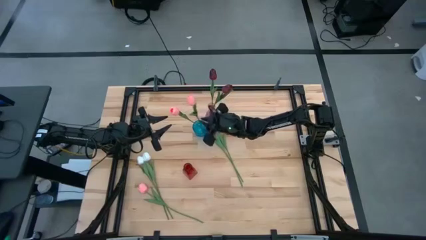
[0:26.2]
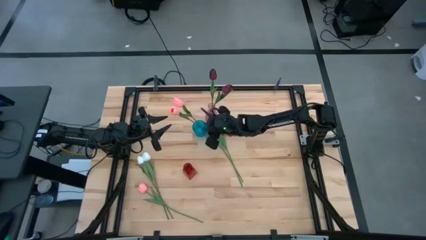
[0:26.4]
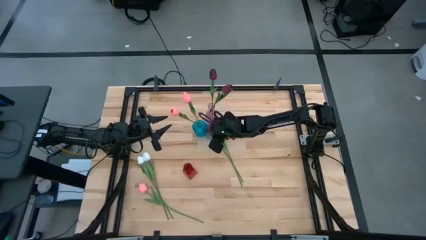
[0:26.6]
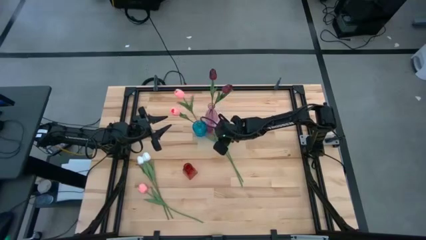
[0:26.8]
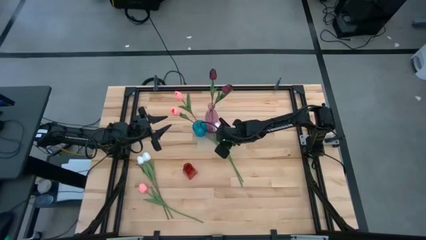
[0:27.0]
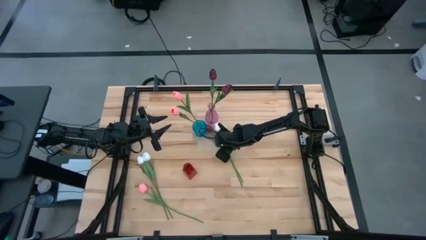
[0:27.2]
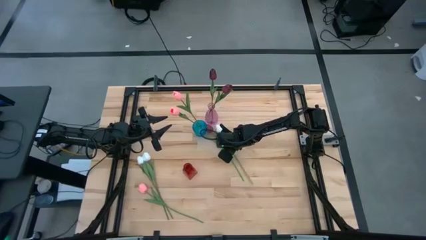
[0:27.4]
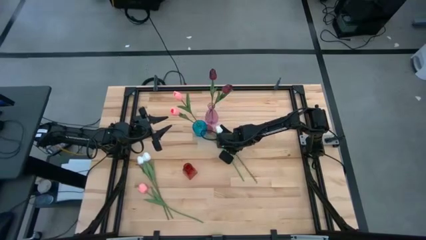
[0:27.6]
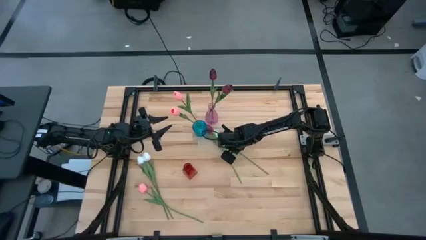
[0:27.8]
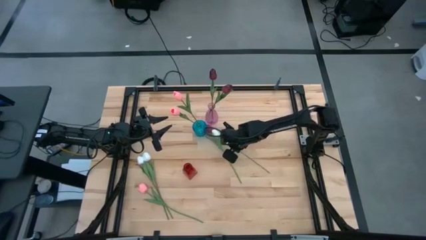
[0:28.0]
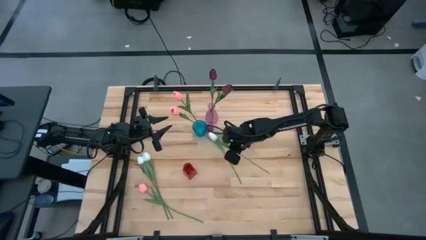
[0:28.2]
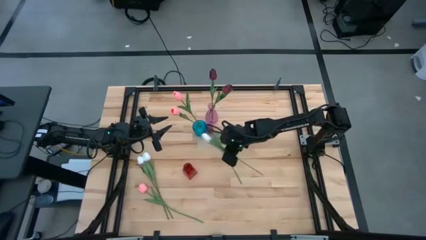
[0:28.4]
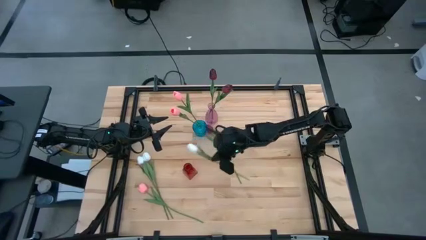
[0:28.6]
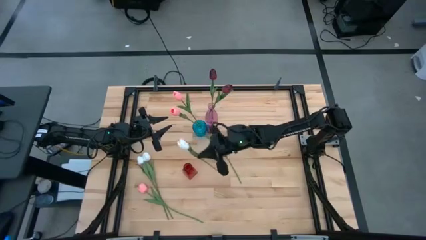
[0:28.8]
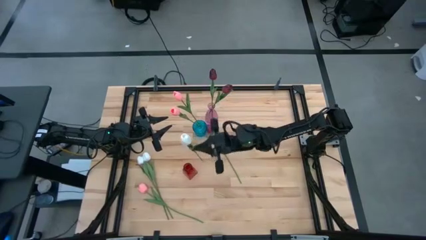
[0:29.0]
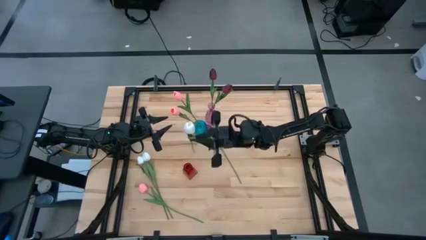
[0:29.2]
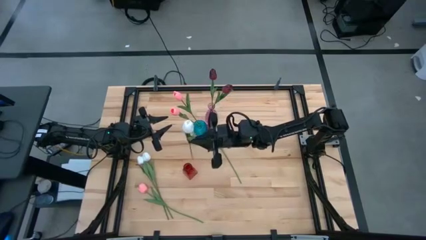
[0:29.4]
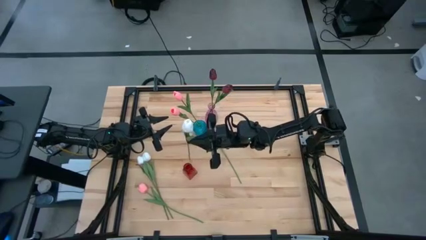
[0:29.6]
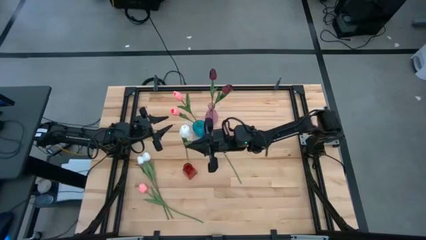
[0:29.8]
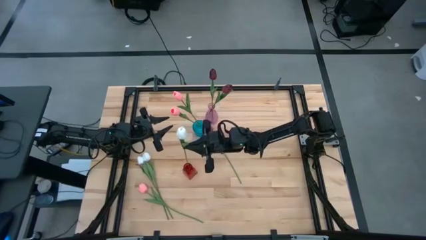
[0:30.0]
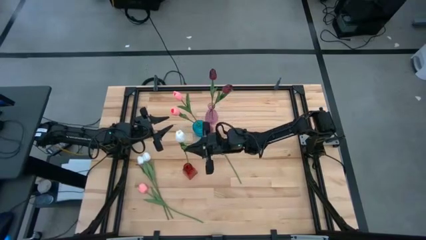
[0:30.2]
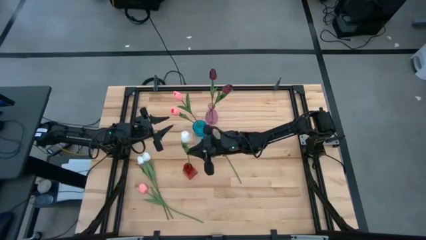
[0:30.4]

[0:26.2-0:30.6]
Task: Sort flowers into vase by color
Put the white flower into the red vase

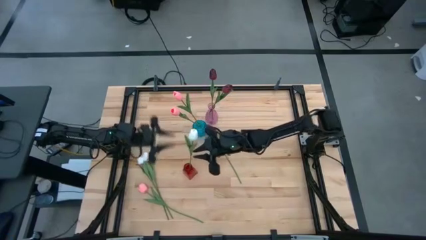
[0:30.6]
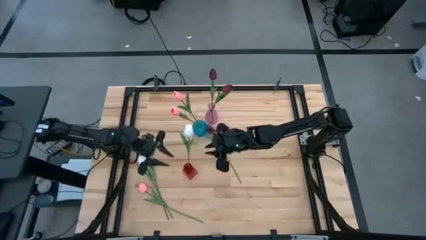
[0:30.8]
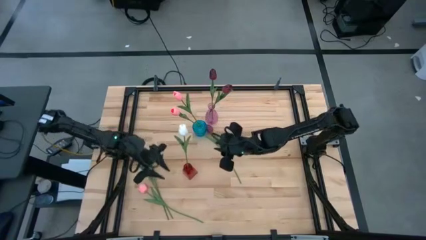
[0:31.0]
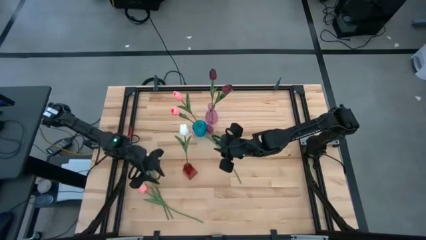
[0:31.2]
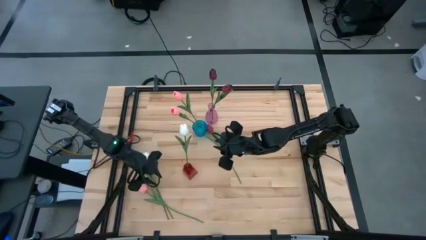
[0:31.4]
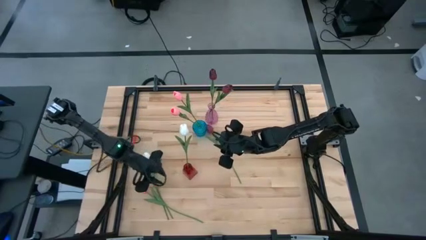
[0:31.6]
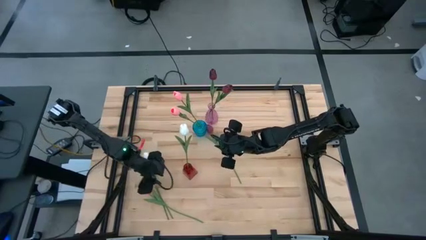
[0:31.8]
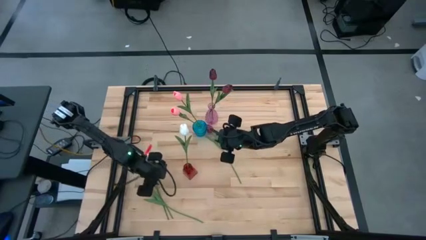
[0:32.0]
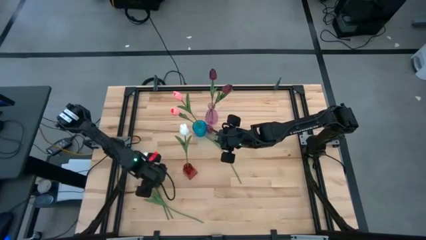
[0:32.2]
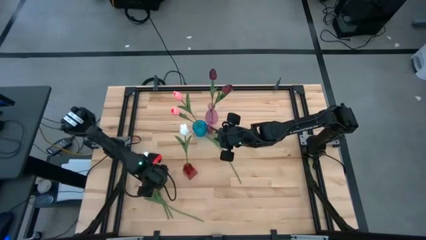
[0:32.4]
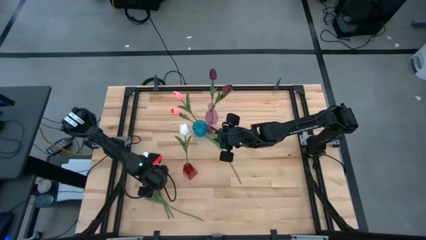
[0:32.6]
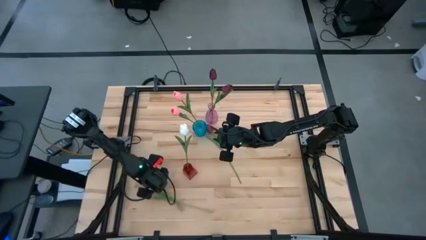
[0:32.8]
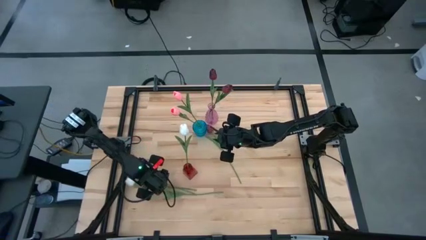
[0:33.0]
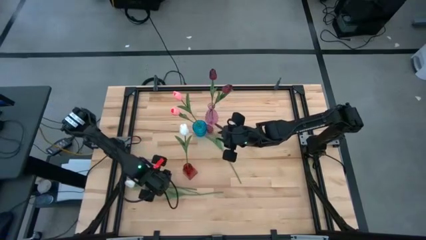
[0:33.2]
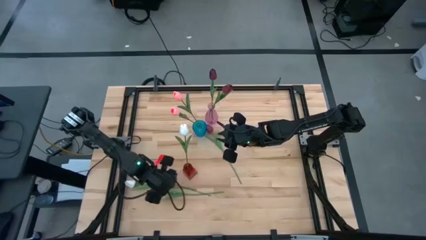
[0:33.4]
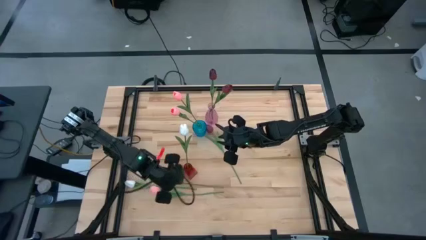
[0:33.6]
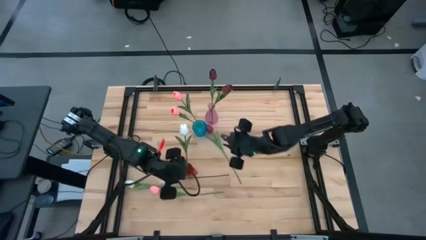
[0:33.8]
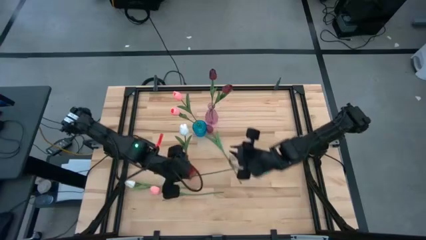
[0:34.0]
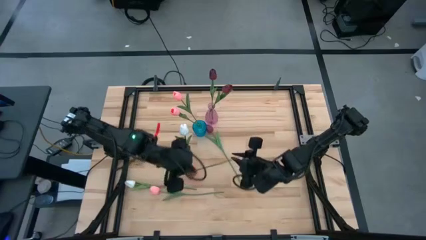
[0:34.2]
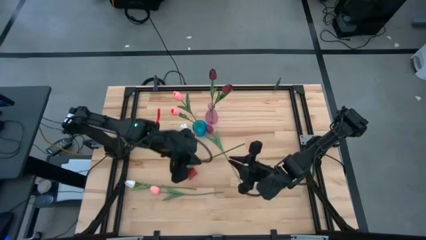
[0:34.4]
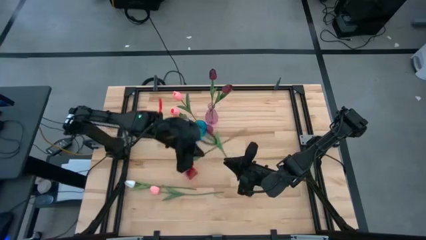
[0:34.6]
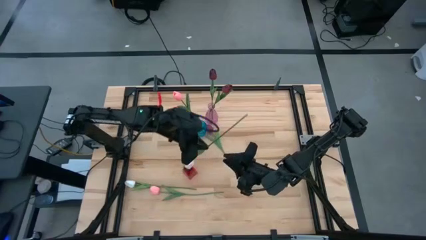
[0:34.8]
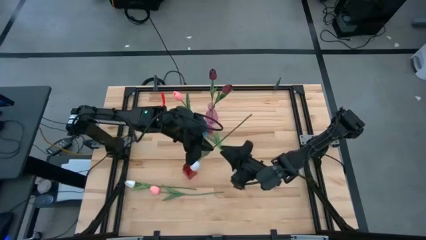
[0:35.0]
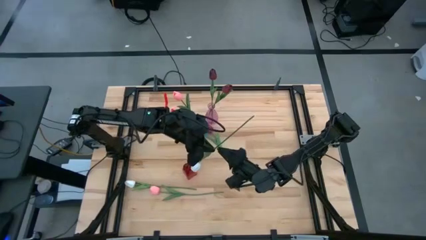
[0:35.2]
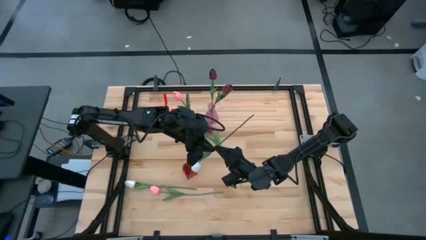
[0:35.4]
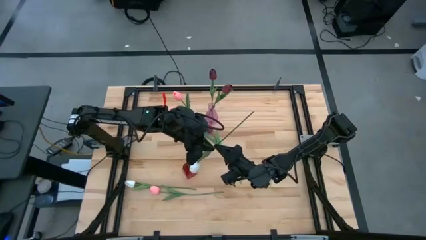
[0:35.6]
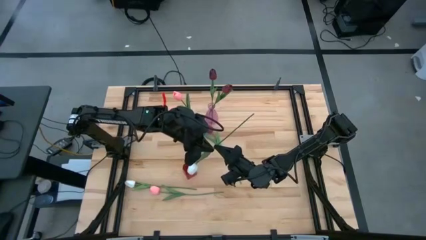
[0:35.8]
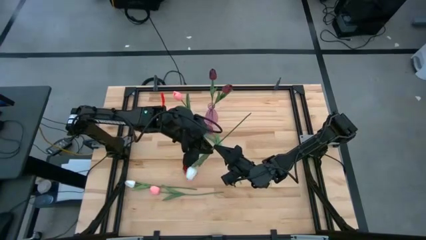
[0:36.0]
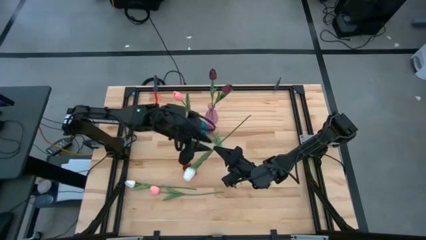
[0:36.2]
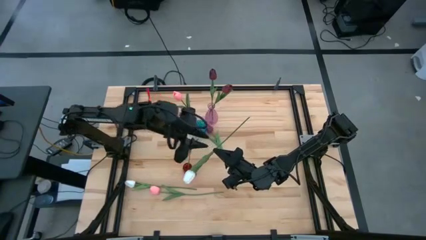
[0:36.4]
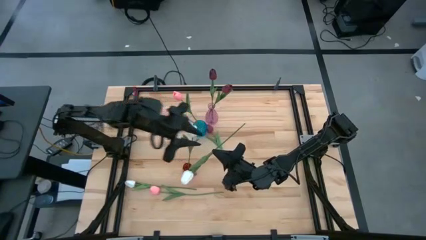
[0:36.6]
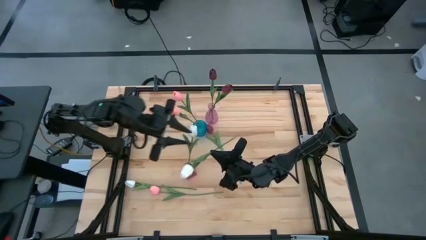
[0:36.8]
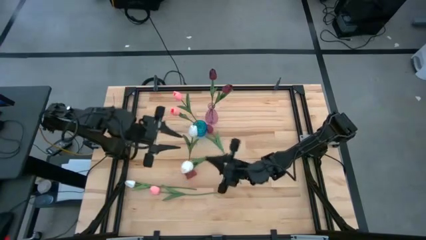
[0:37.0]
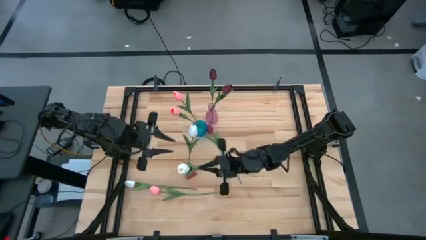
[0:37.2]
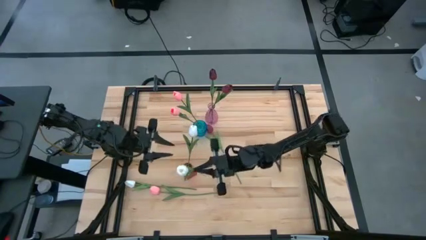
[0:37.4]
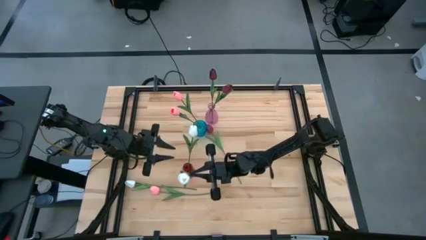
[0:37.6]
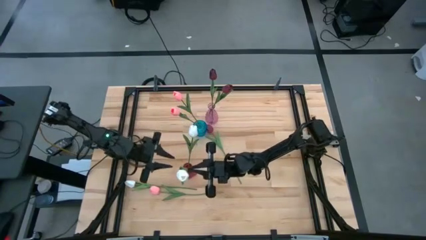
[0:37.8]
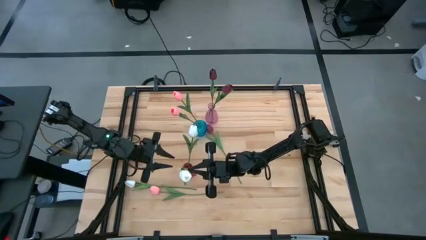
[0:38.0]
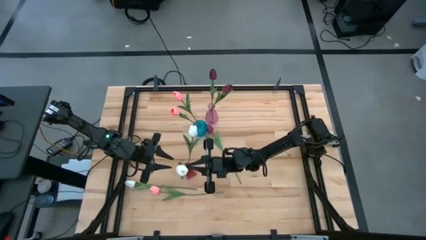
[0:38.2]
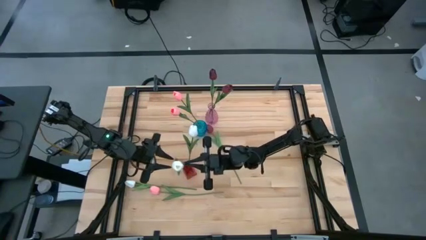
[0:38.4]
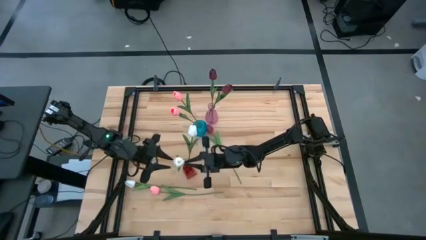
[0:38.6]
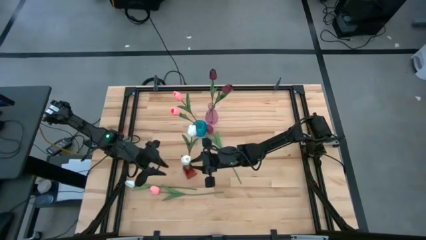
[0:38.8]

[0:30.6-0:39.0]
Put the white flower into the red vase

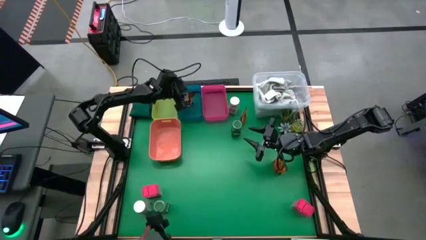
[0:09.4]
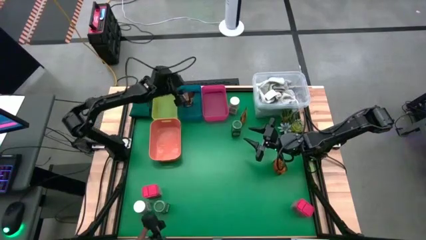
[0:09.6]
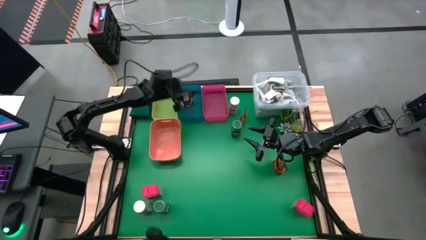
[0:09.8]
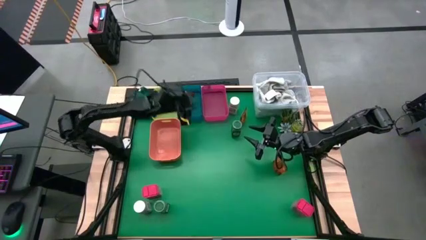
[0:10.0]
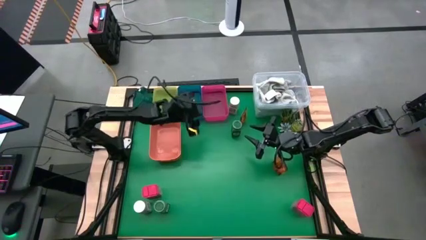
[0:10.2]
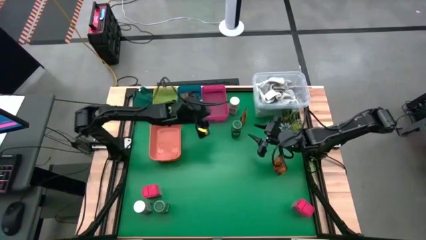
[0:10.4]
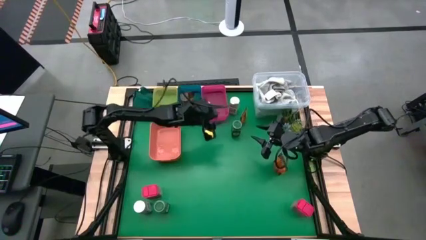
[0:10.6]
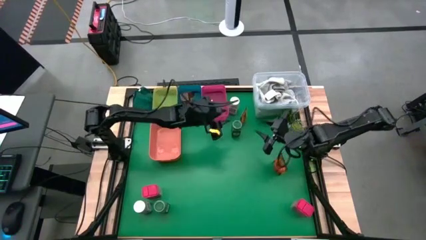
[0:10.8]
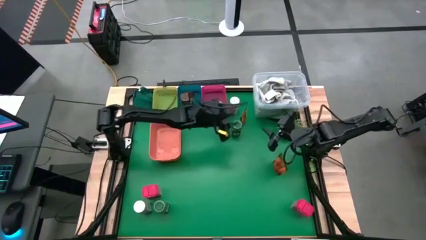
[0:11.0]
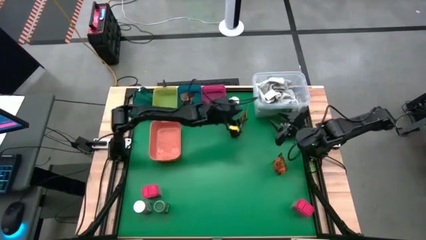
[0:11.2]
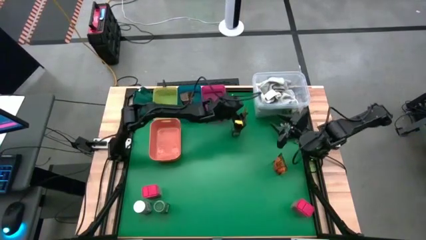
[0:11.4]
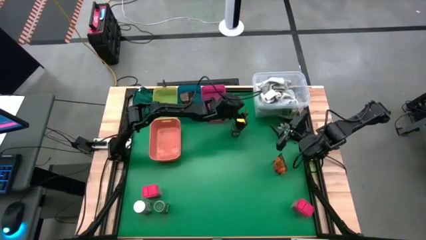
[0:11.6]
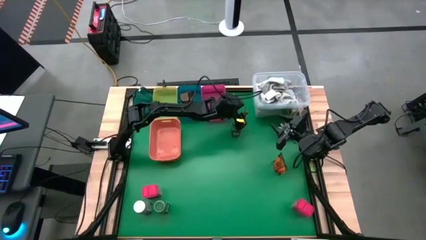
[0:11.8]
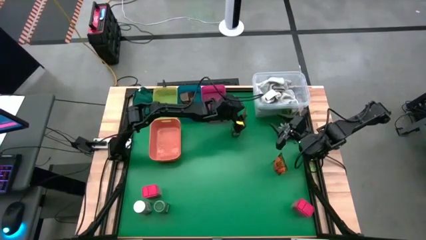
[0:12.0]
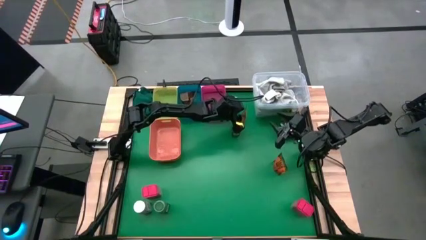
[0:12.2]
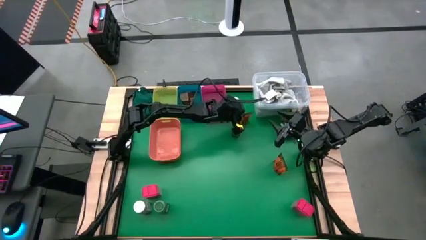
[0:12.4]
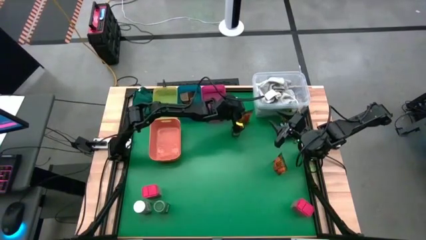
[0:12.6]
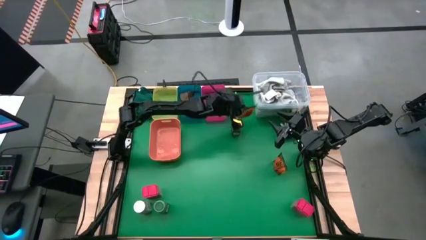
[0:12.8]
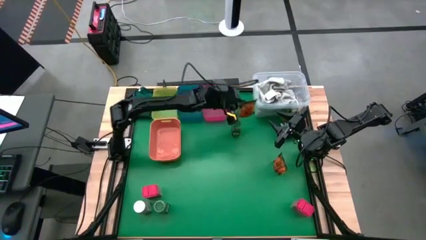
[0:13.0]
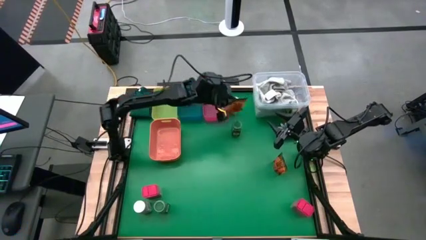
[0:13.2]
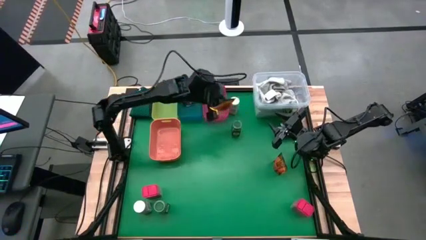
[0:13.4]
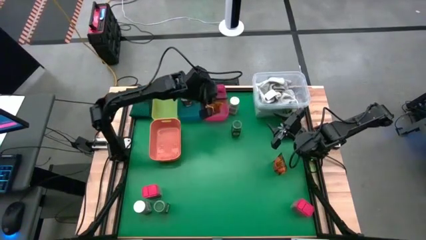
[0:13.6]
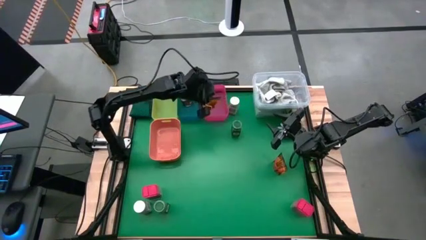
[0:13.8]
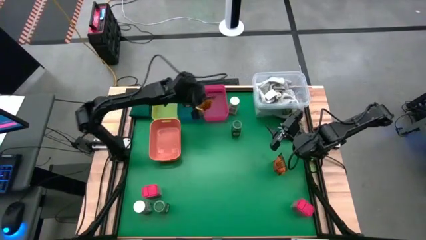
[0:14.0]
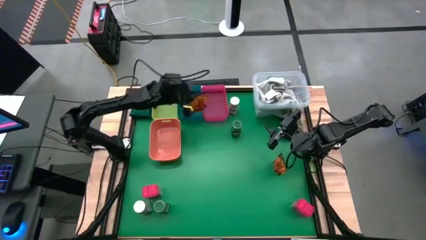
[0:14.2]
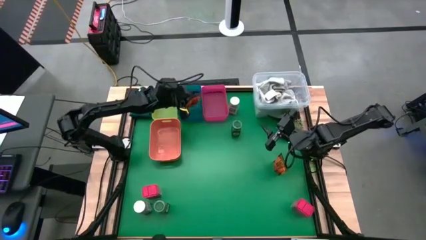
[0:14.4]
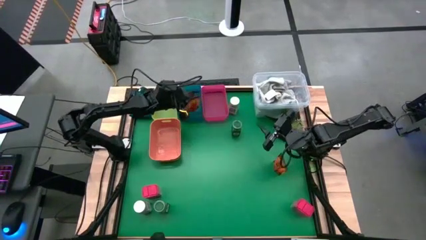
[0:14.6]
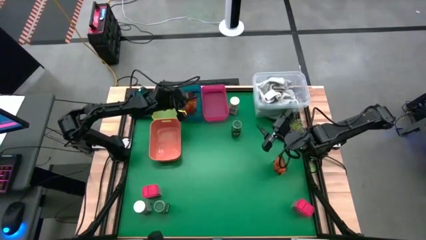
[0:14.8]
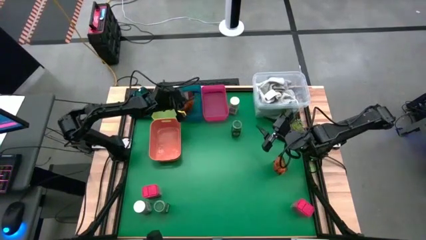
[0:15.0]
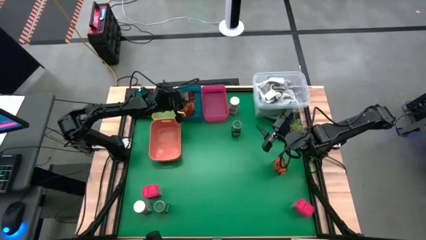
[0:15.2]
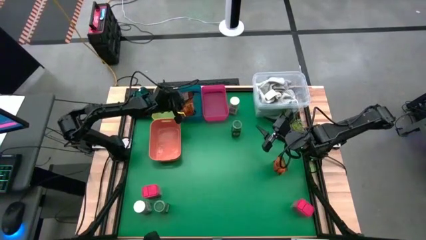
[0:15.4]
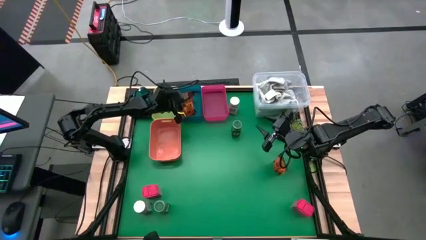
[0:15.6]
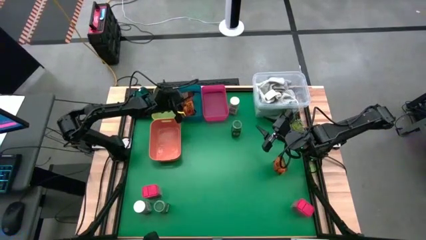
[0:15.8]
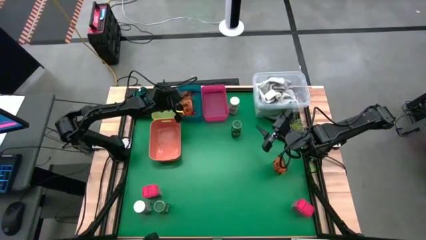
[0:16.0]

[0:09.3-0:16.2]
Task: Sort spices by type
Put the top orange spice bag into the blue bin
